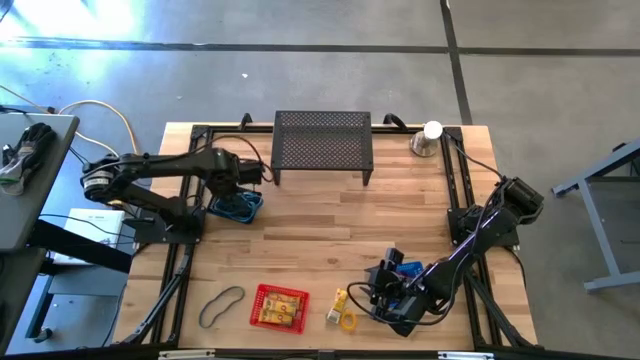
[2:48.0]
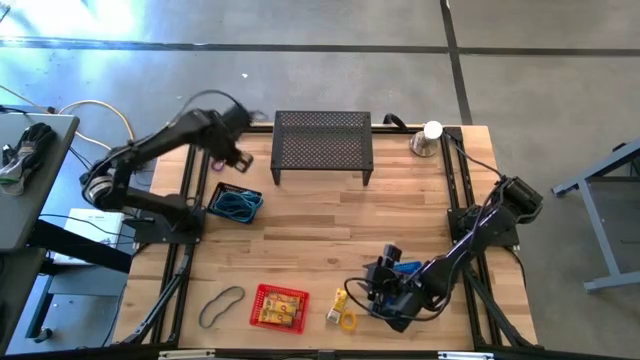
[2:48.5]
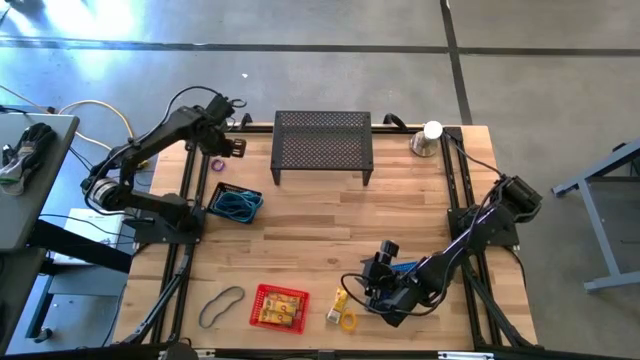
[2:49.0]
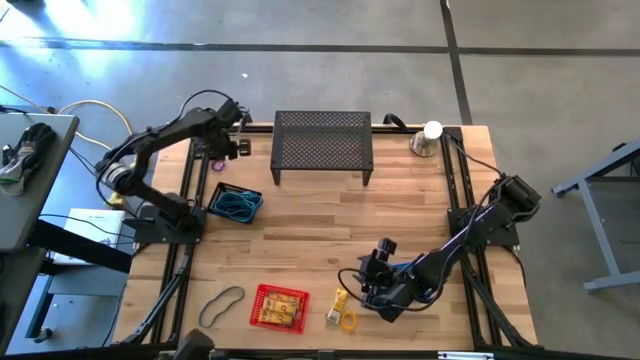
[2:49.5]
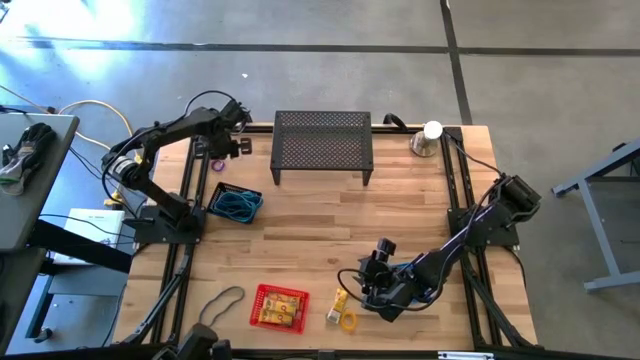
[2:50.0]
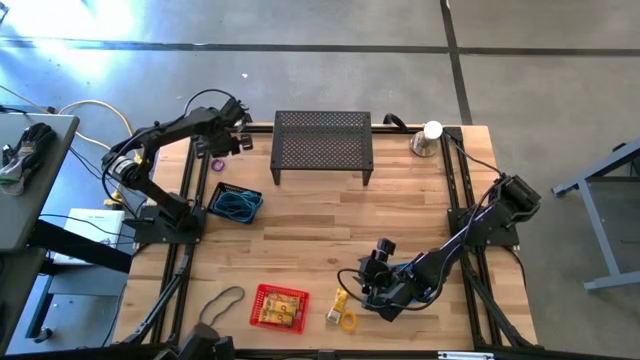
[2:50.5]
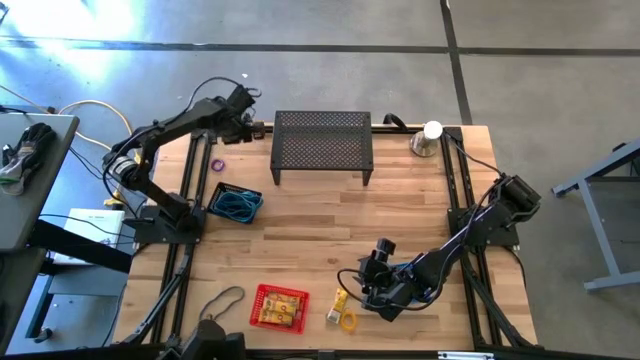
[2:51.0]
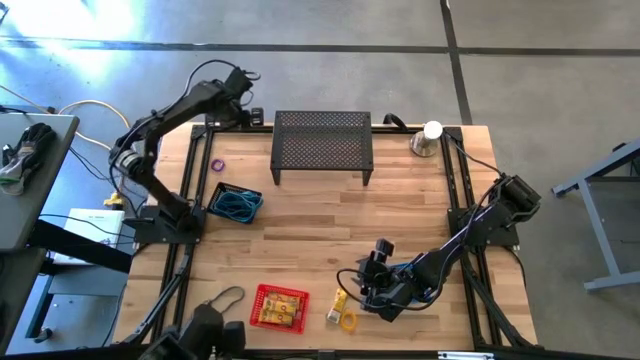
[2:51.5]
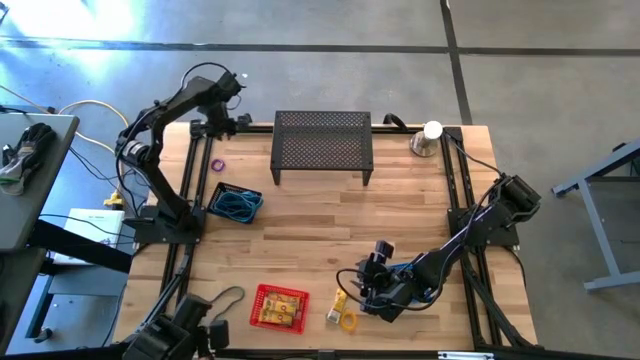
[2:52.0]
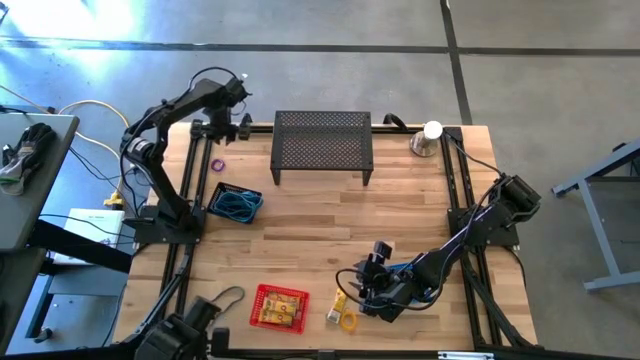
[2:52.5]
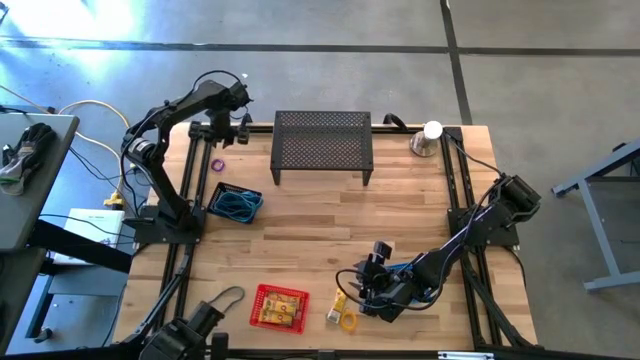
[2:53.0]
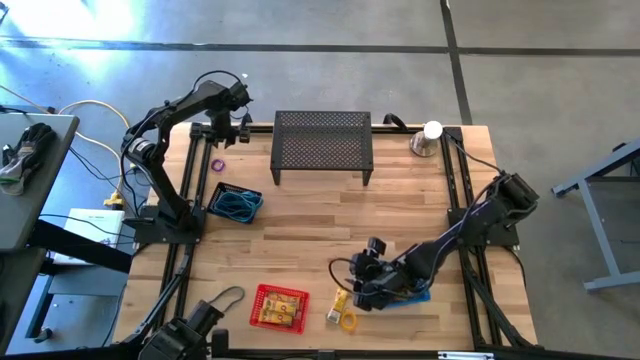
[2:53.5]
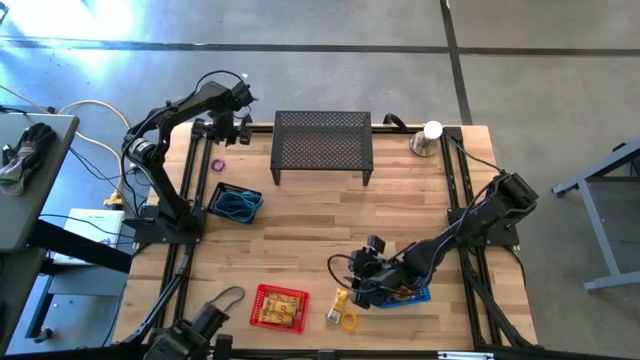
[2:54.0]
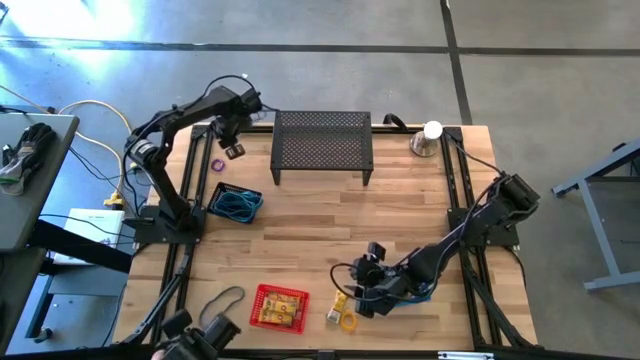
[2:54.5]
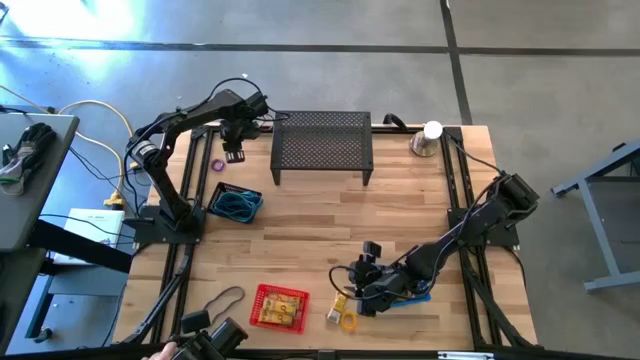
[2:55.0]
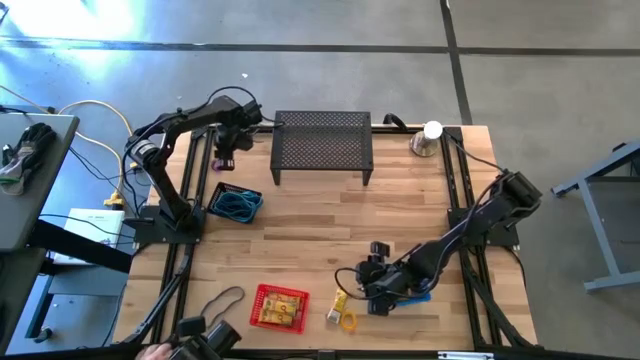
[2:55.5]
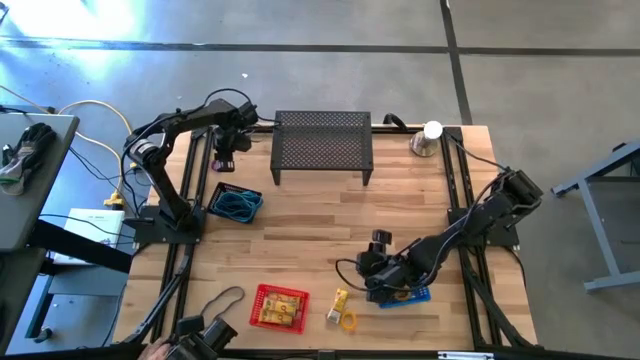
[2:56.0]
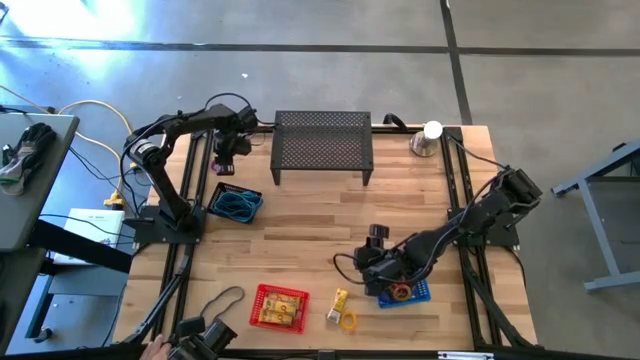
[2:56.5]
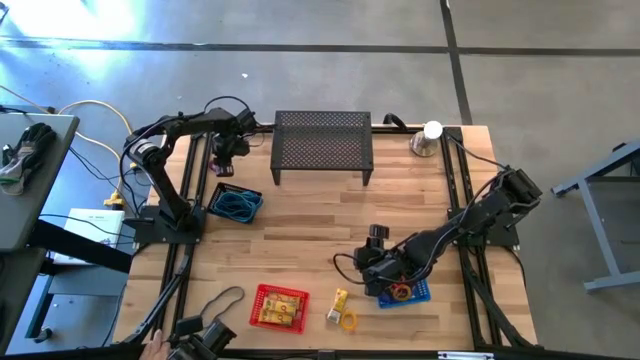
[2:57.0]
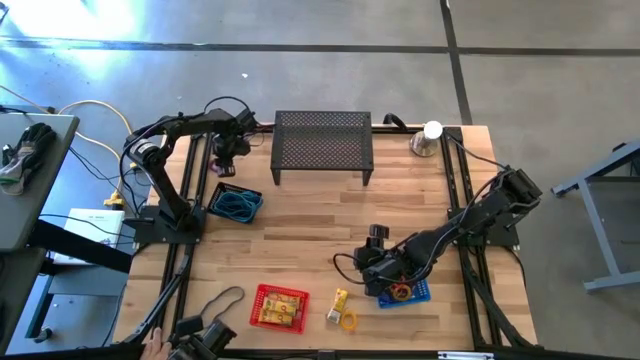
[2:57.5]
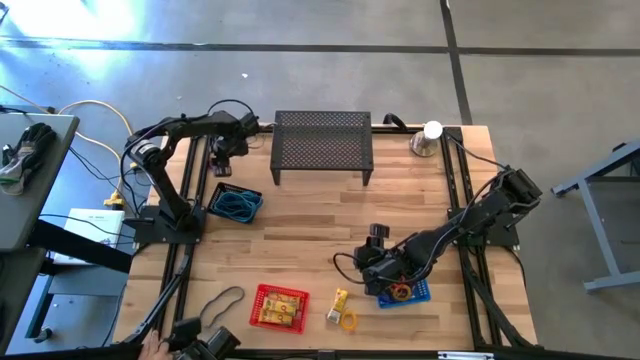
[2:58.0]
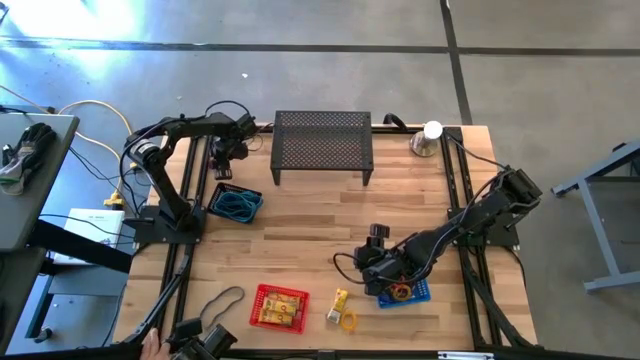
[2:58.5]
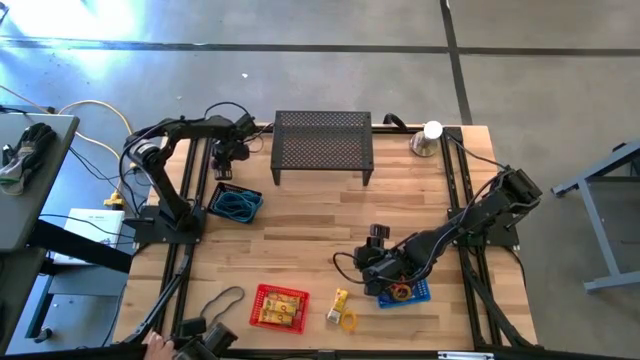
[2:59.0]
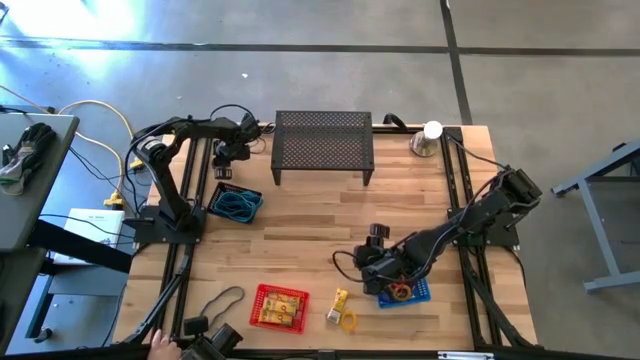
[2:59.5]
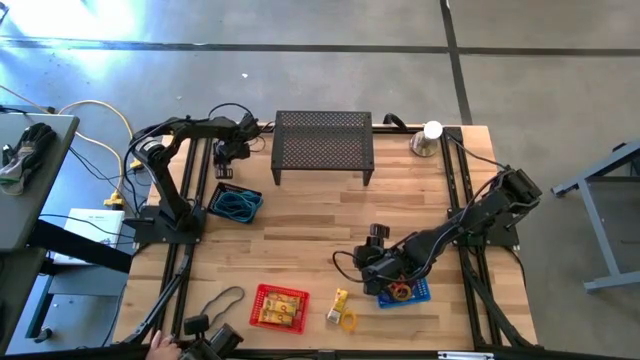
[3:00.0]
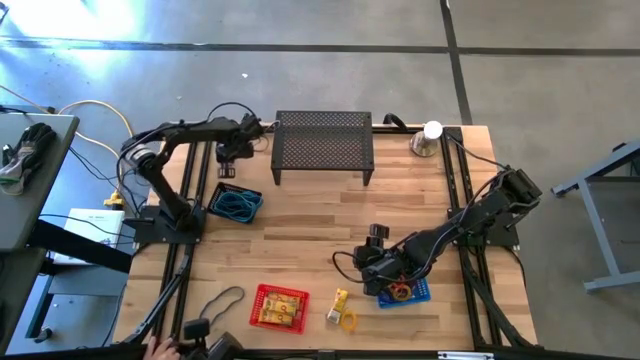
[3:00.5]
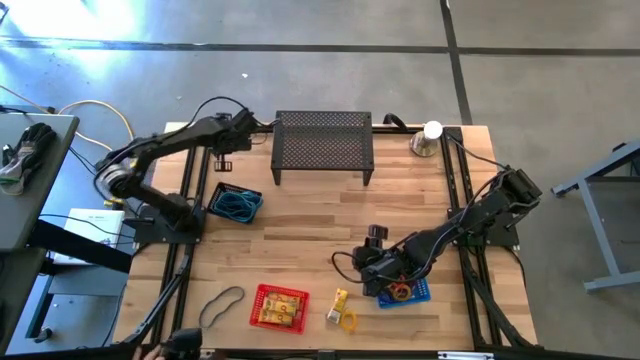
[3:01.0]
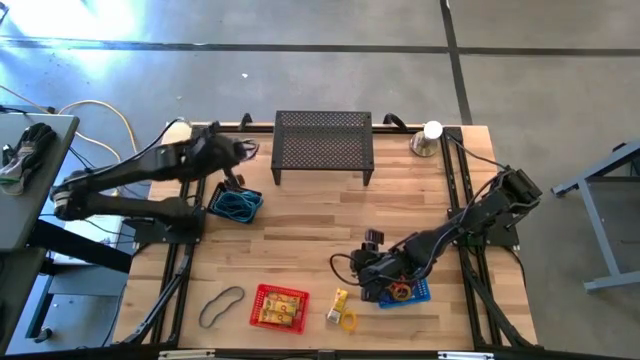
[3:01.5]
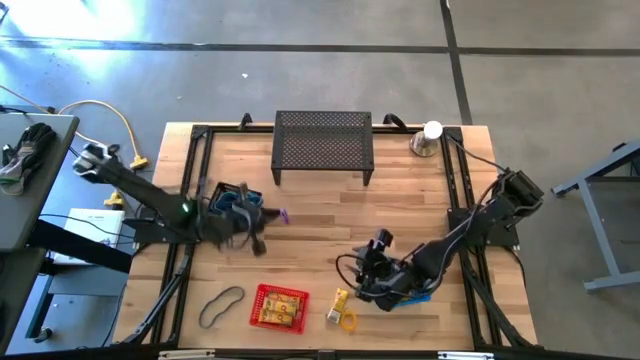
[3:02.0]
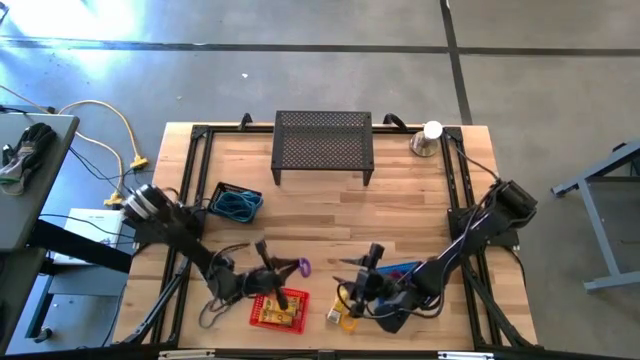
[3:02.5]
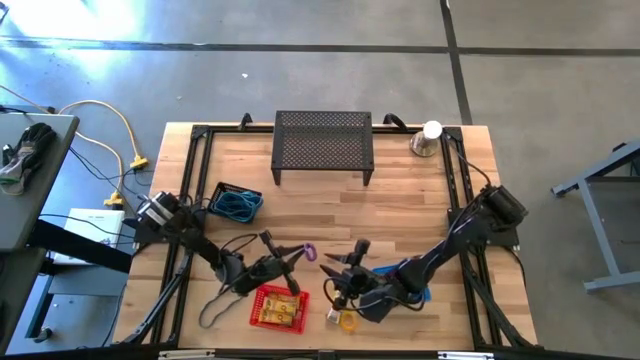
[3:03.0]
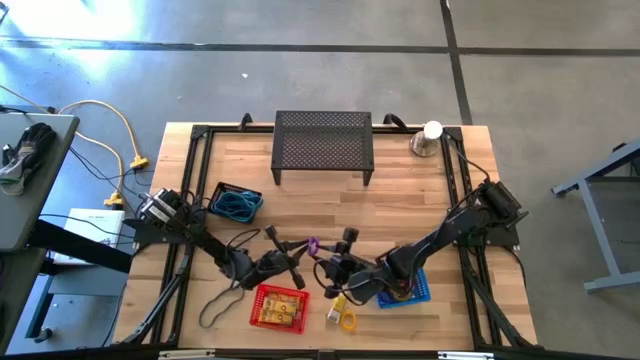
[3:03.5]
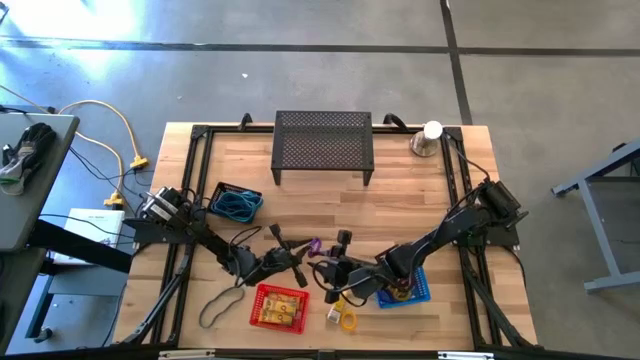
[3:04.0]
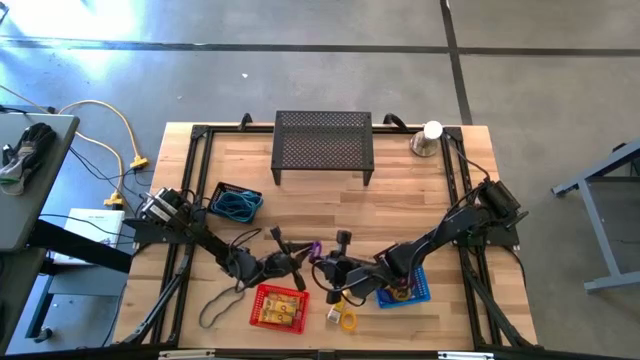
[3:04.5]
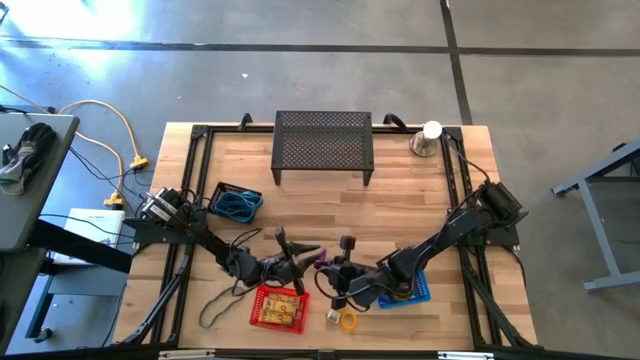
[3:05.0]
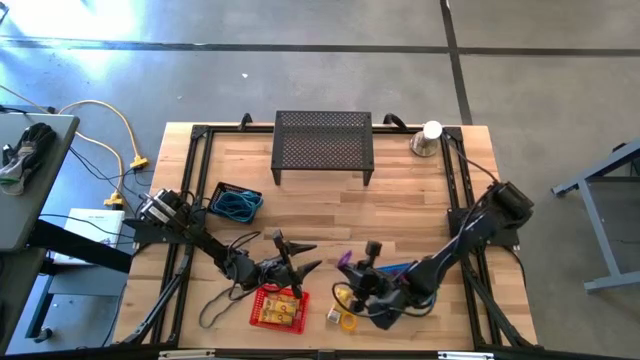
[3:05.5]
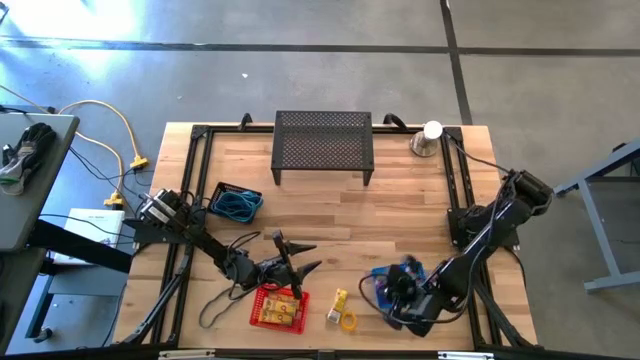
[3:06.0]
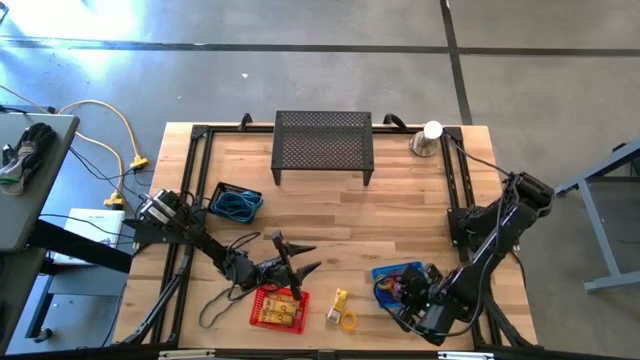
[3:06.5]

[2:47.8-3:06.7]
Task: Pick & Place Office Desk Supplies
Put the violet spring keychain into the blue bin

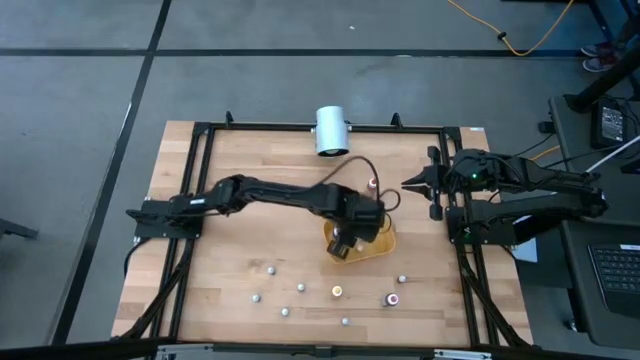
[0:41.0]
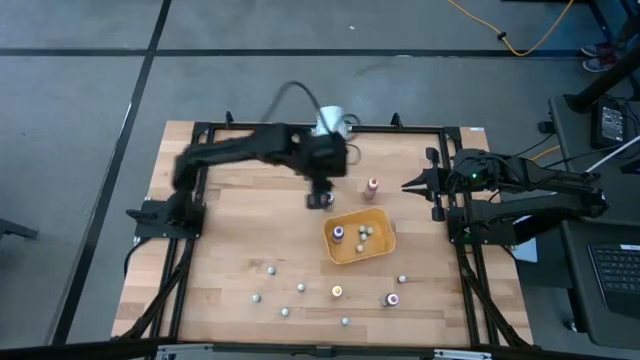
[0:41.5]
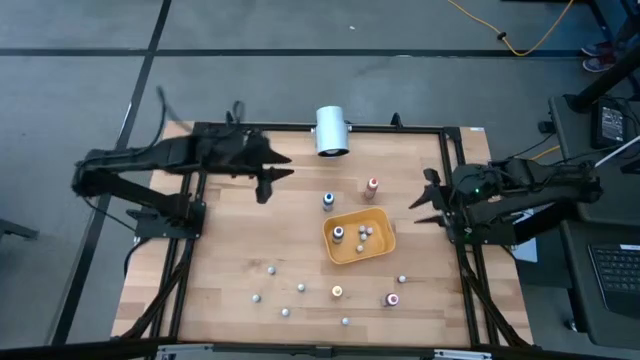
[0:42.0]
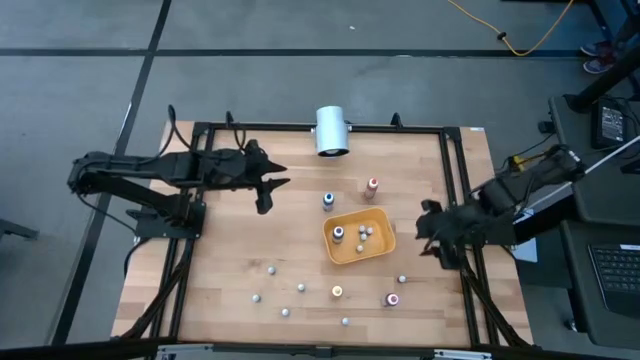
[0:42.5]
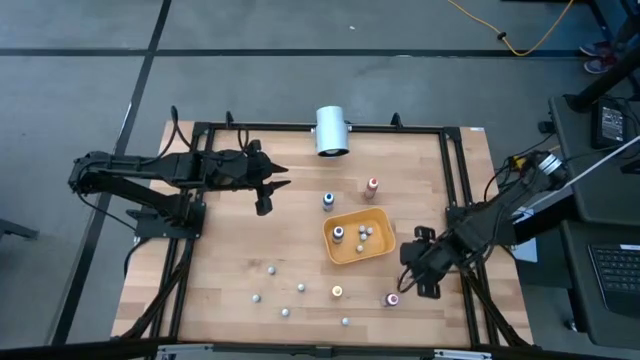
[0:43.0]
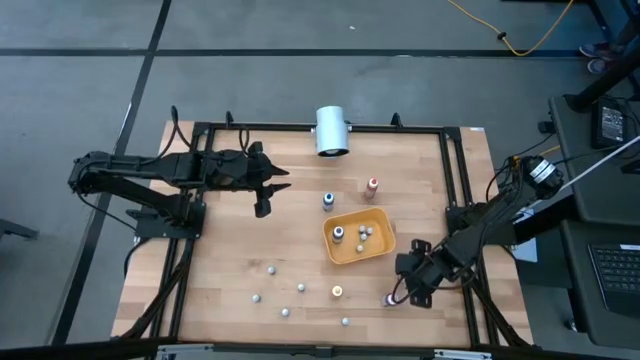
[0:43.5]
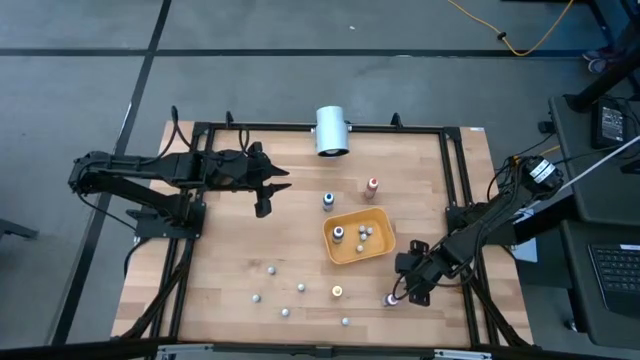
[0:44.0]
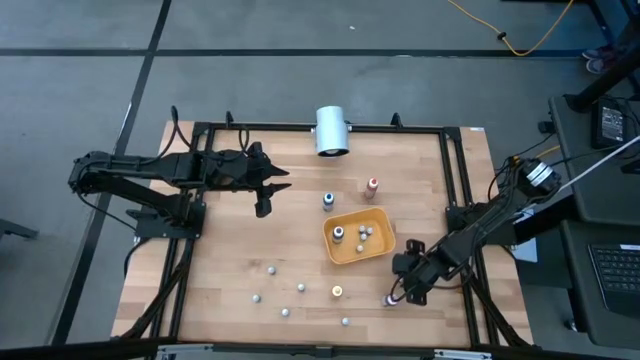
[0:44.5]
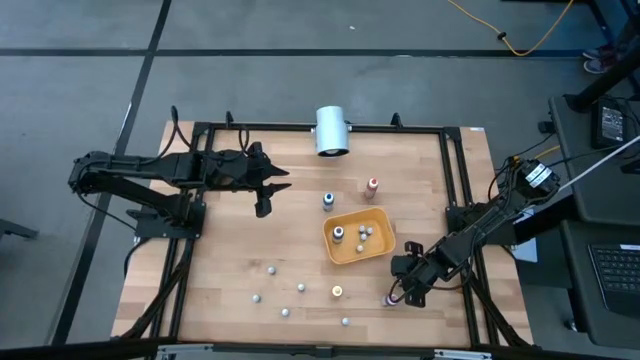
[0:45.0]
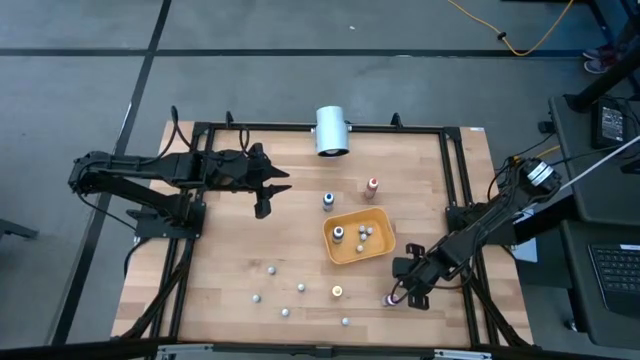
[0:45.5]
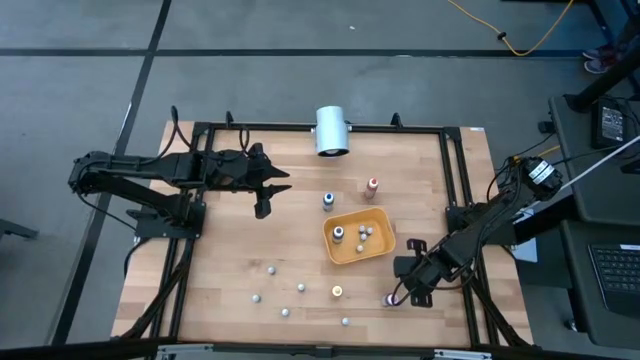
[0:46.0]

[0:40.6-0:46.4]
Task: Pick & Place food coloring
Put the small pink food coloring bottle into the yellow bin
